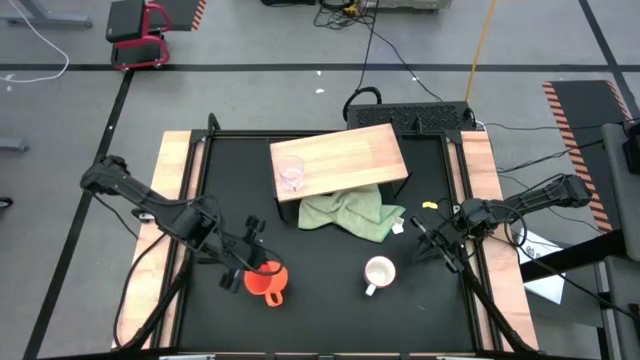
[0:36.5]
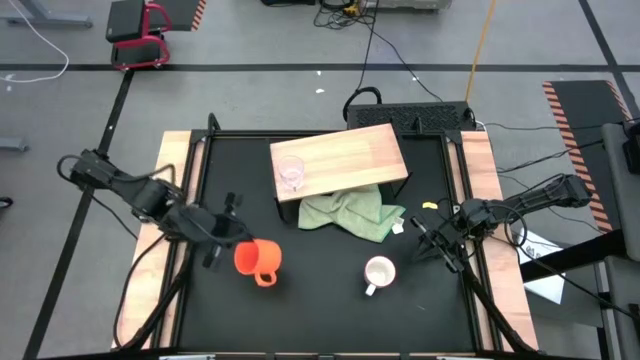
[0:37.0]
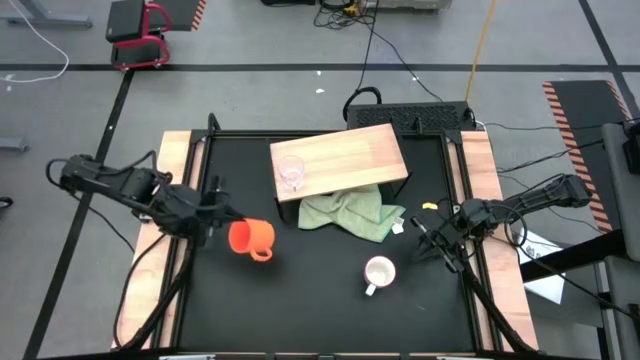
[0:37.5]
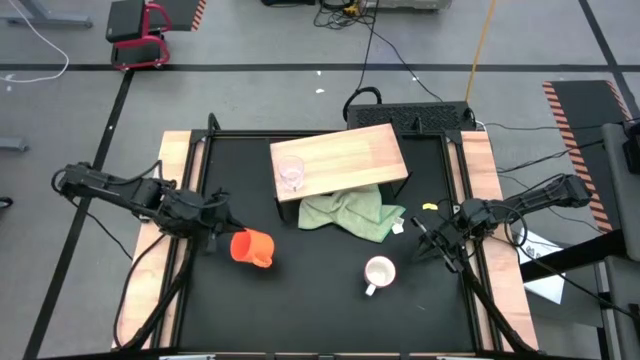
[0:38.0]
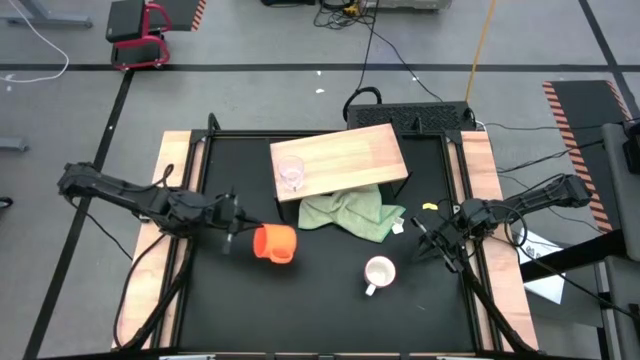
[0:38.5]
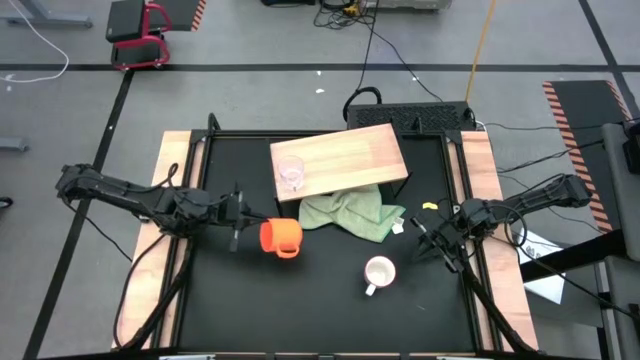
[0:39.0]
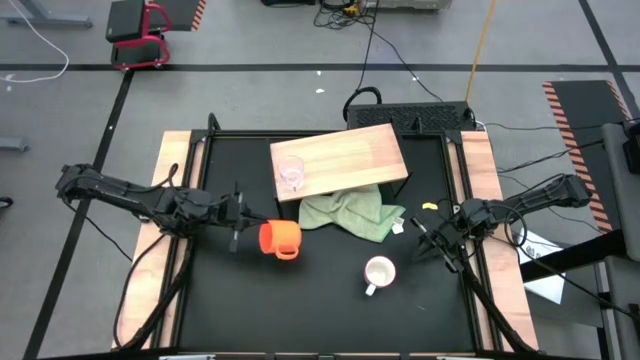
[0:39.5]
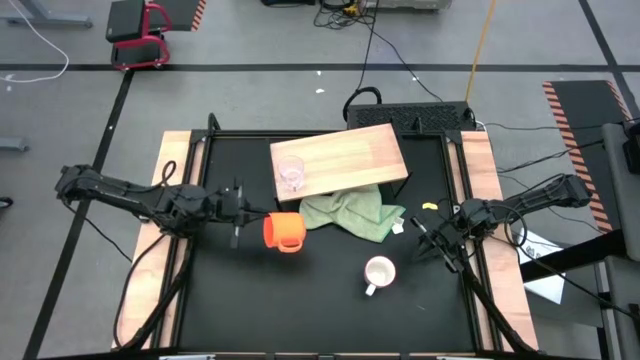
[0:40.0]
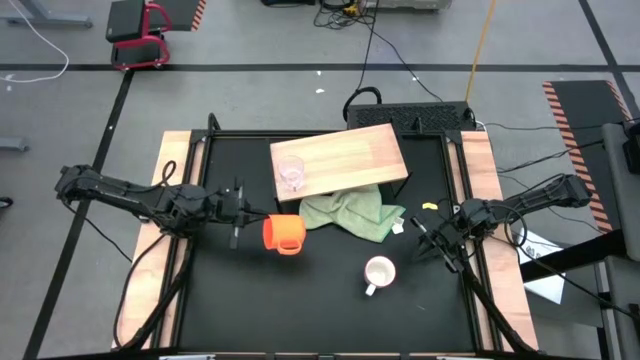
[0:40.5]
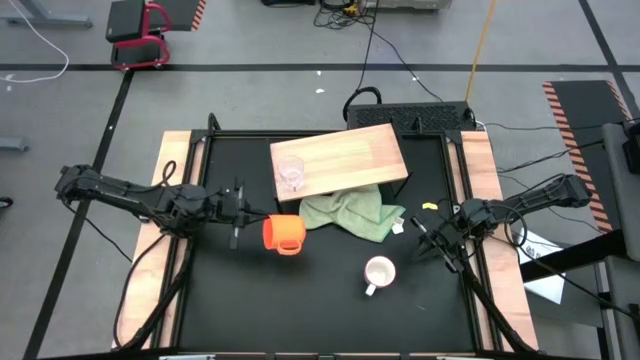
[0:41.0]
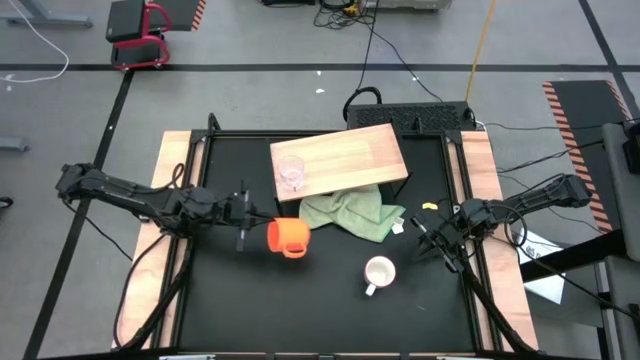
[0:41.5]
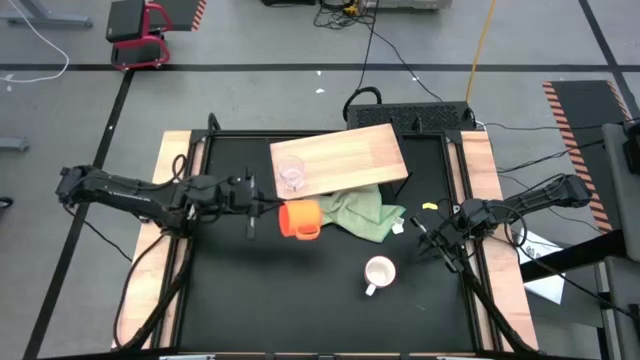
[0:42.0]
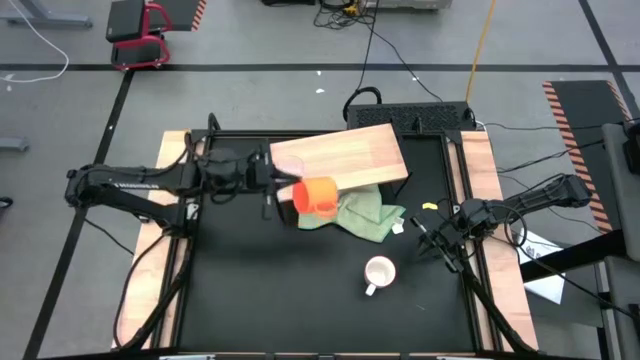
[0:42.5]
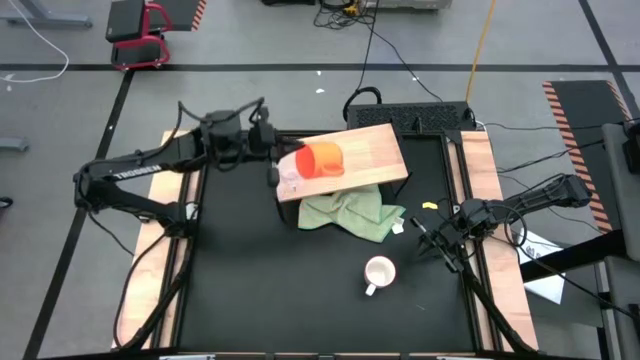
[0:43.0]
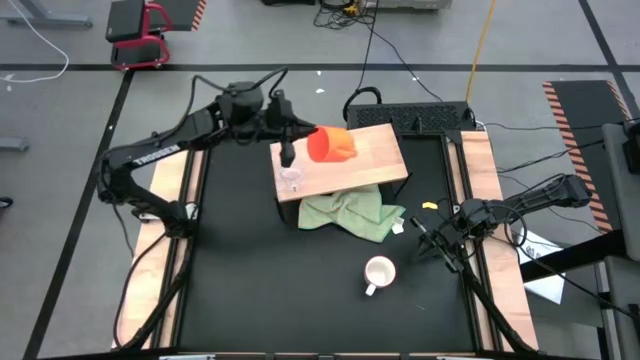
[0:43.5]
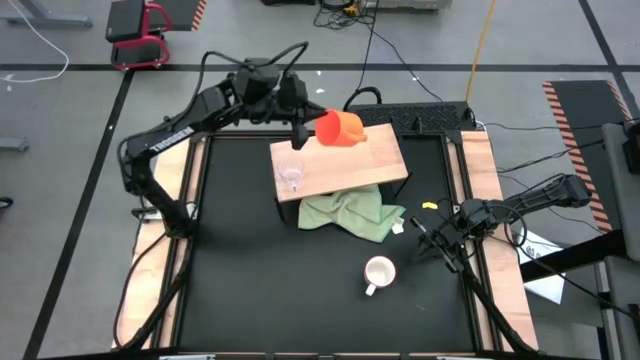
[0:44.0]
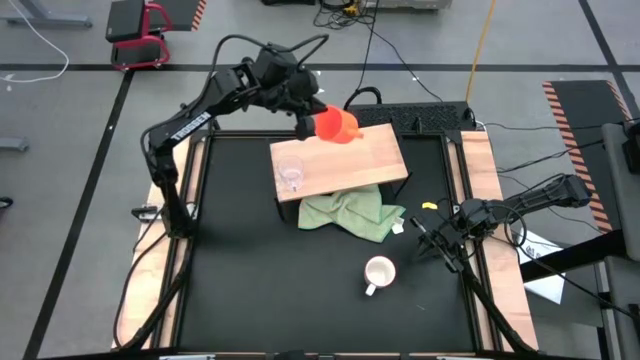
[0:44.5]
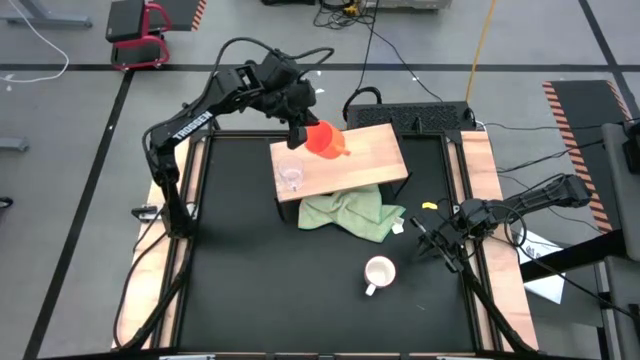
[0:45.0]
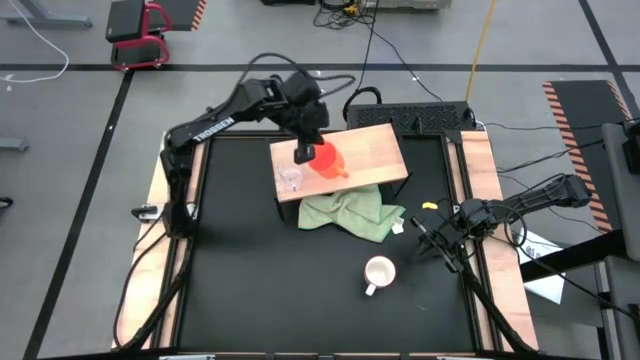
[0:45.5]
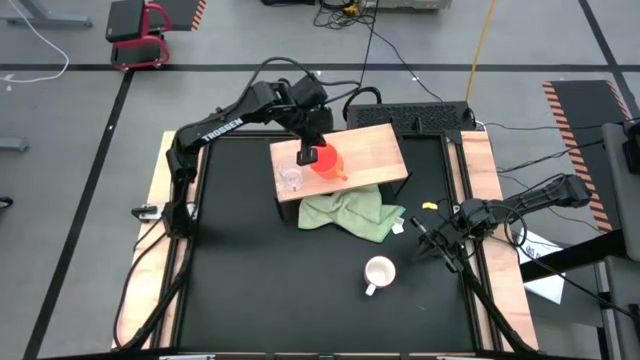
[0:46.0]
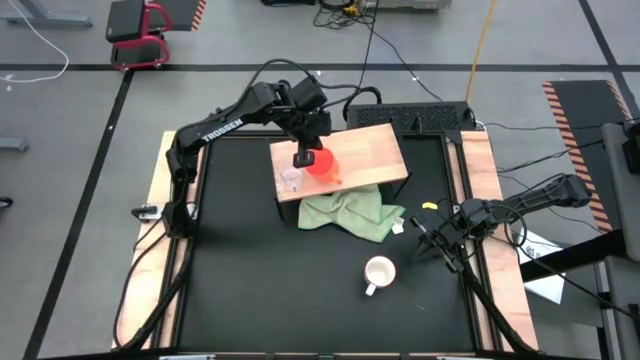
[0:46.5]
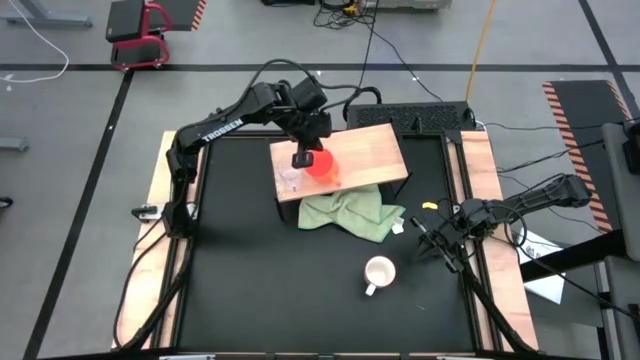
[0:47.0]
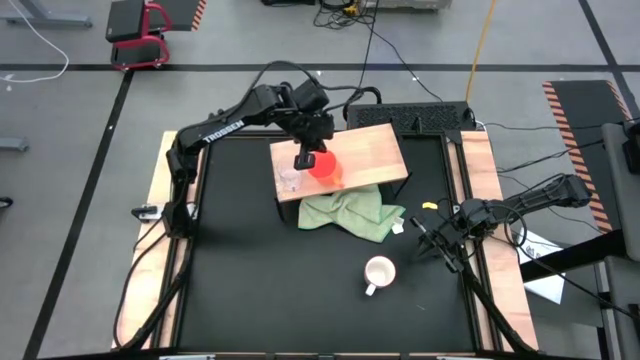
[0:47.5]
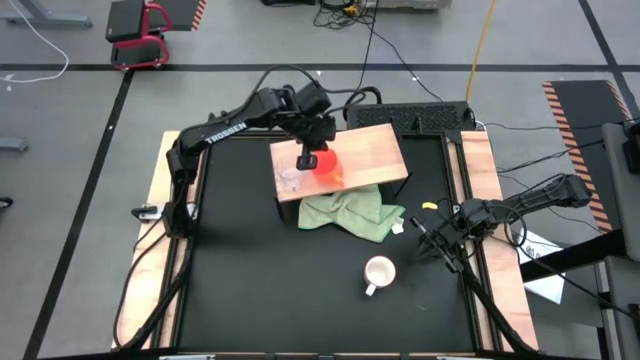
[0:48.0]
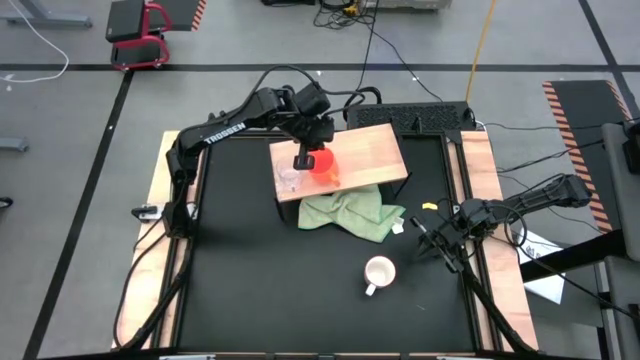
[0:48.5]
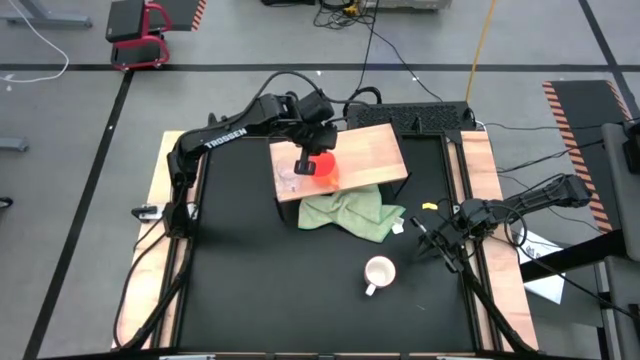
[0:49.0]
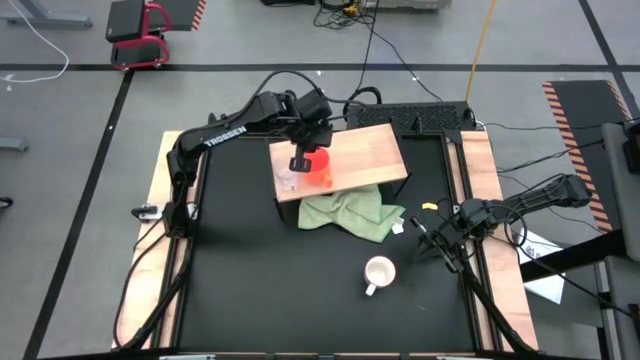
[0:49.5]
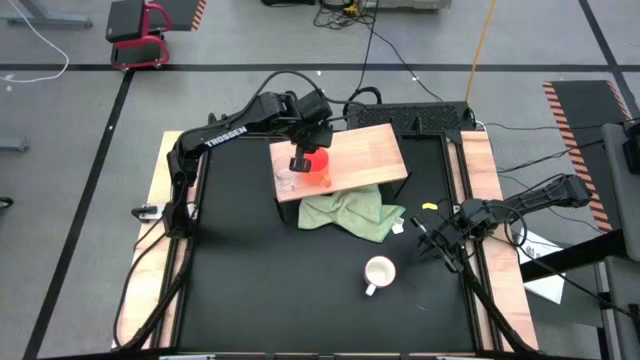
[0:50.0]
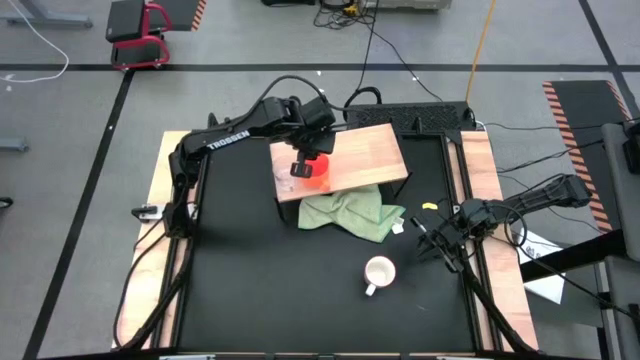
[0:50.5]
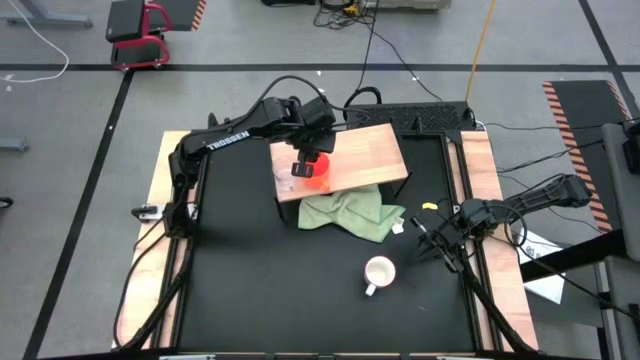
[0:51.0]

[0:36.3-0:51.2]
Task: Stack small to large cups/mugs on shelf
Put orange cup on the shelf

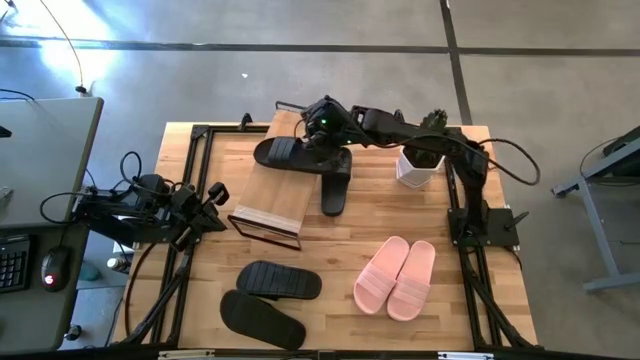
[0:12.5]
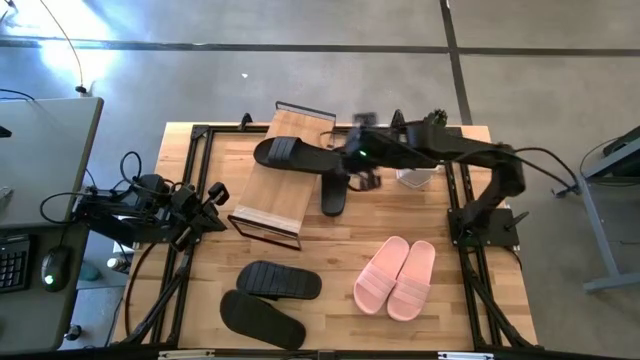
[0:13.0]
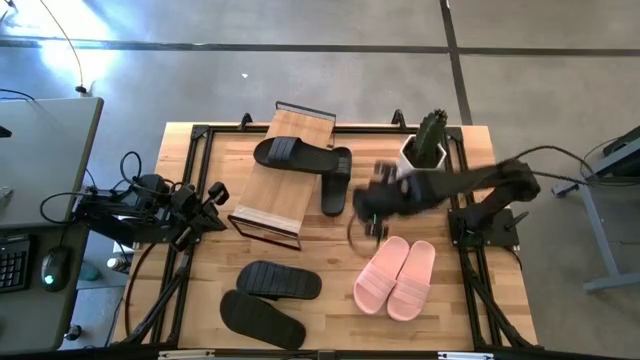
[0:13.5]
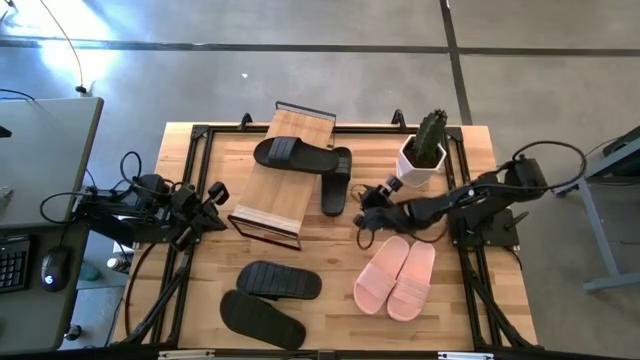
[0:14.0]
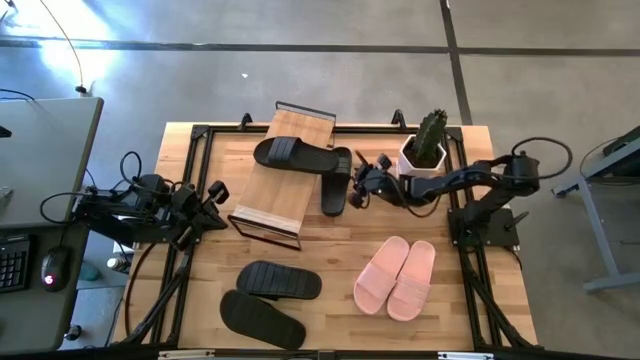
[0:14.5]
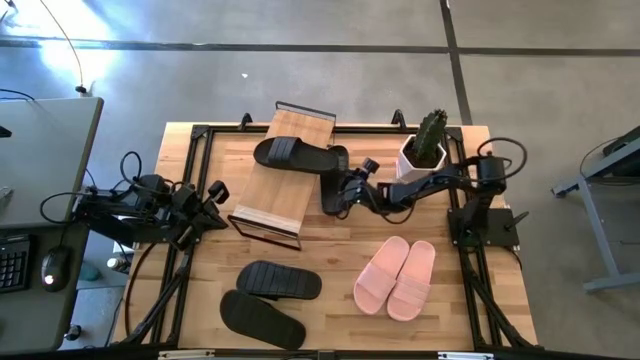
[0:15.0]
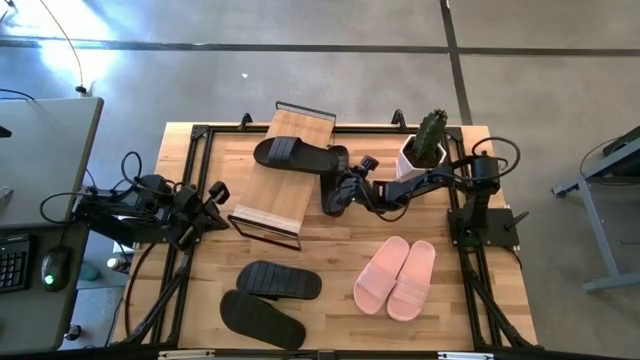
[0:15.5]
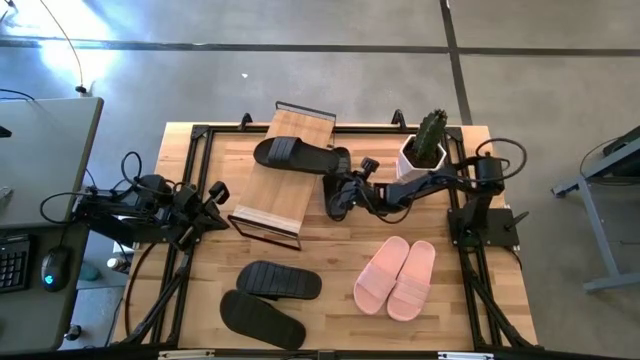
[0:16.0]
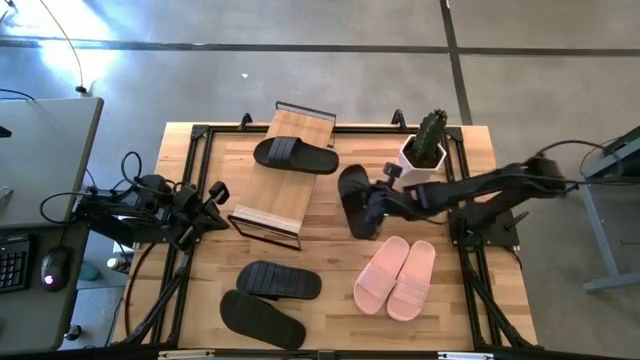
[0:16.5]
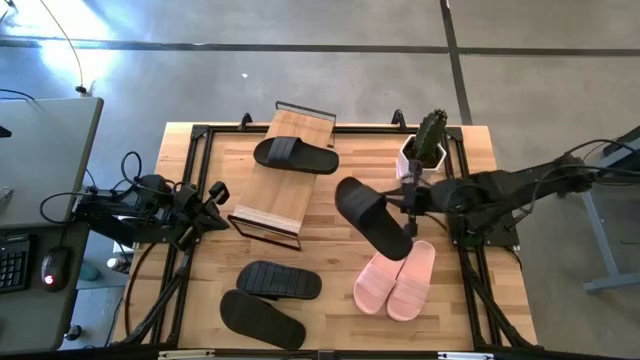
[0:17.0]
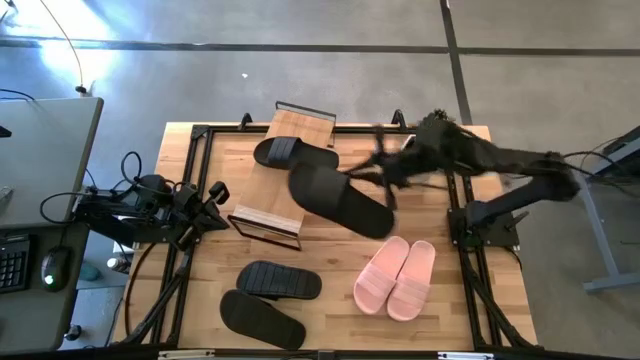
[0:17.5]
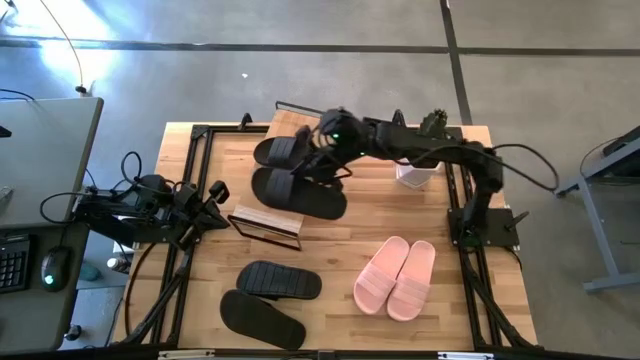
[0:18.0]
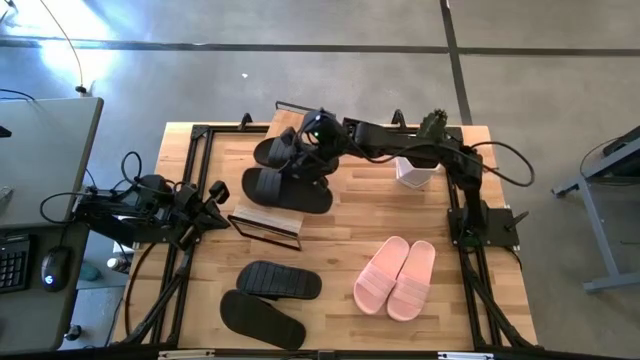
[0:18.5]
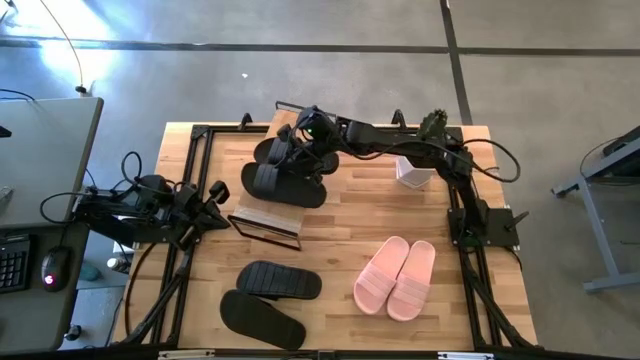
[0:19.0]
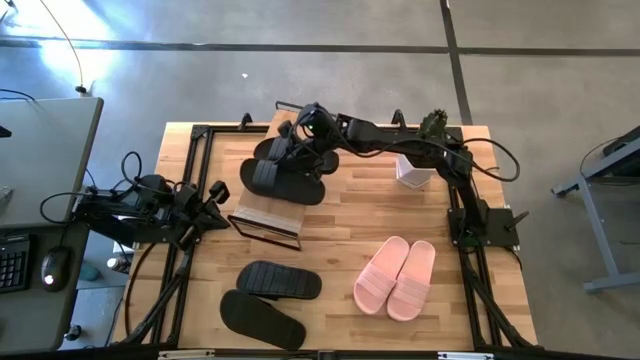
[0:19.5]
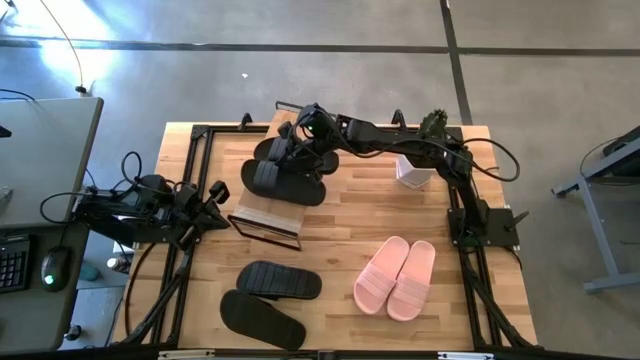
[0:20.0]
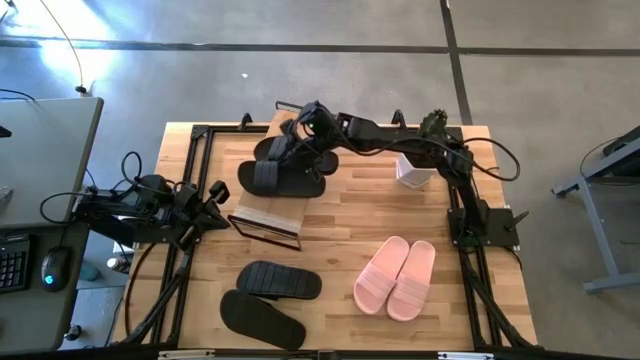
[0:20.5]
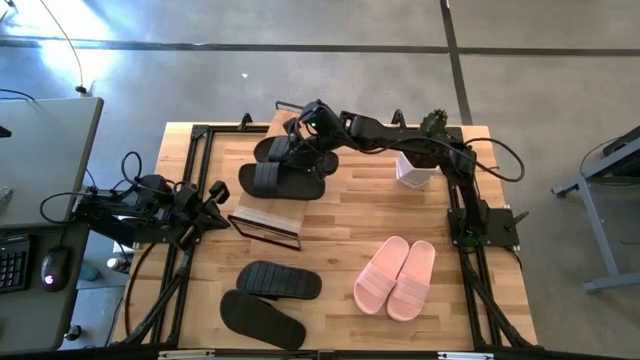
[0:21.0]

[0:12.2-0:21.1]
Task: Pick and place slides into the shelf
Put the black slides on the shelf
